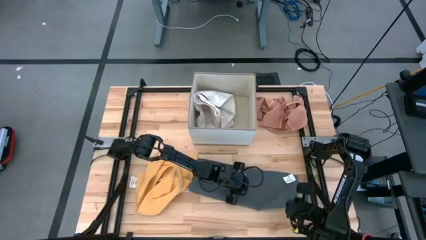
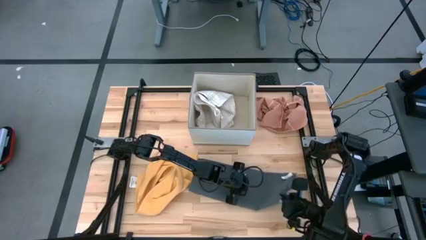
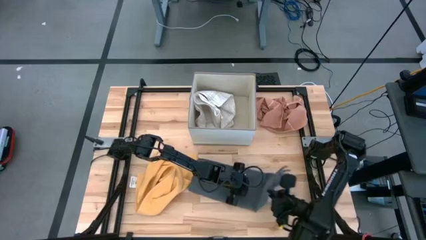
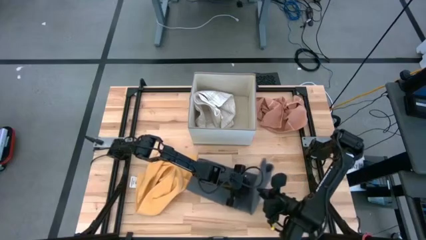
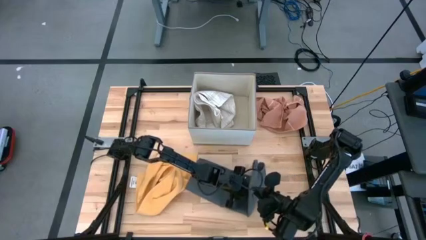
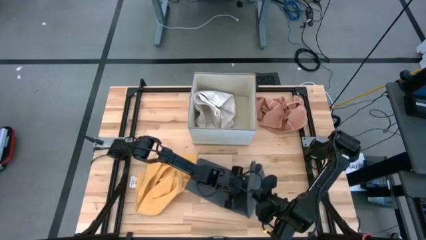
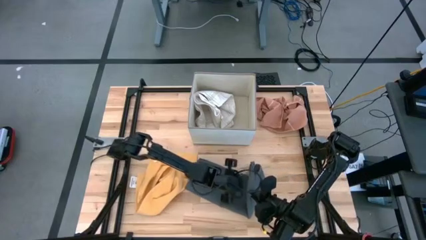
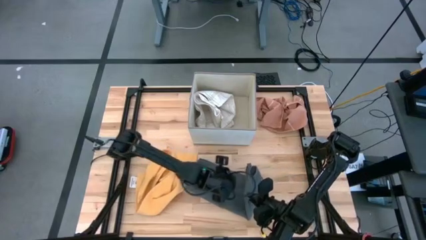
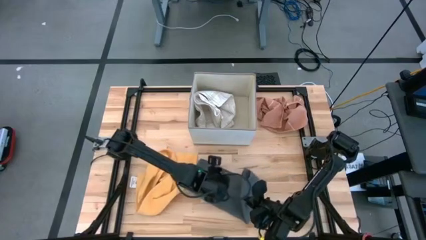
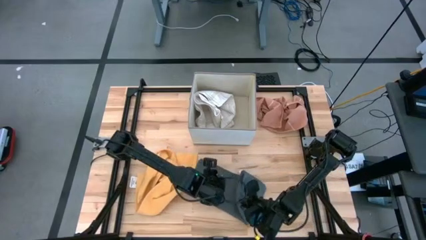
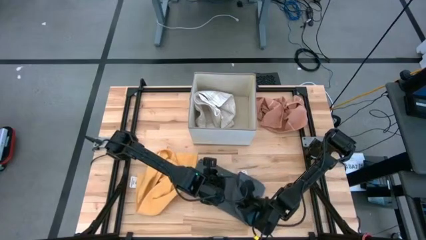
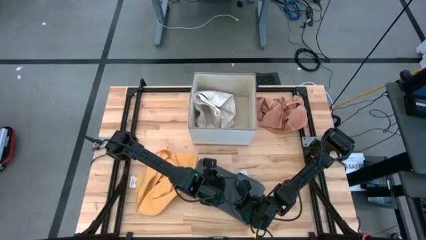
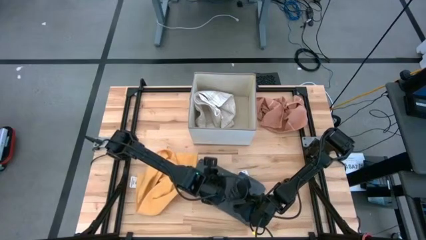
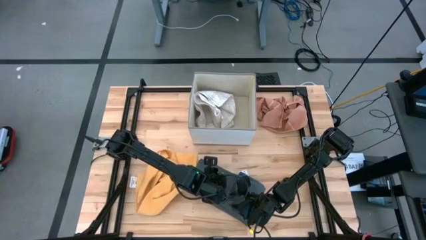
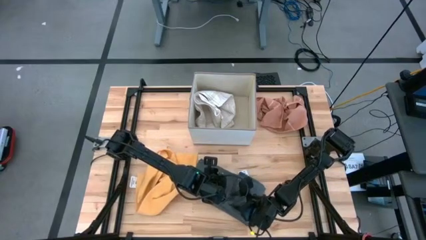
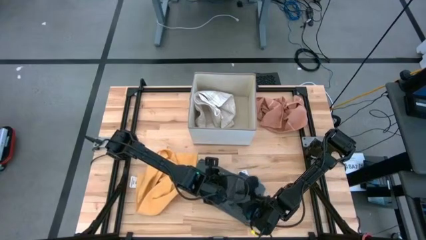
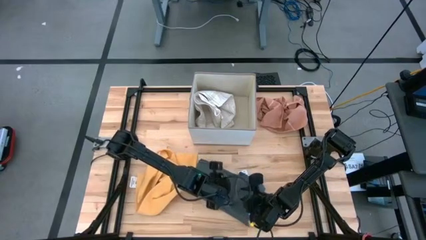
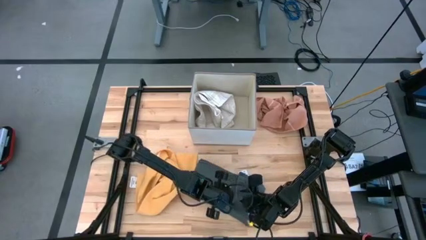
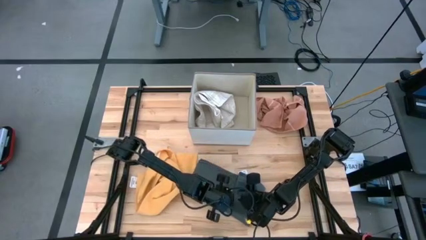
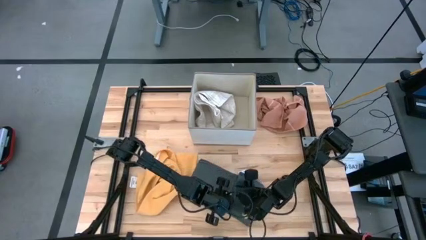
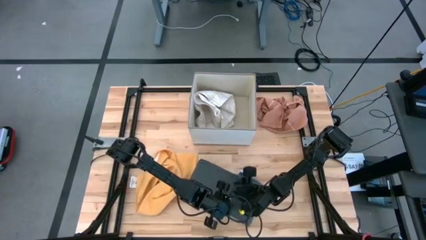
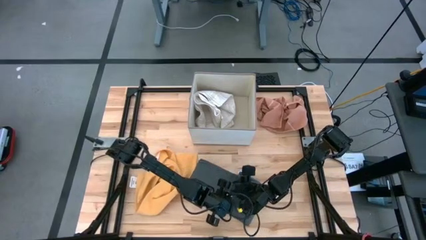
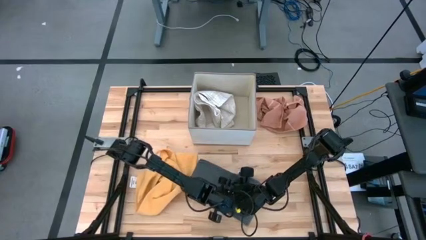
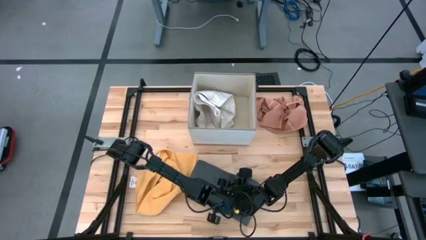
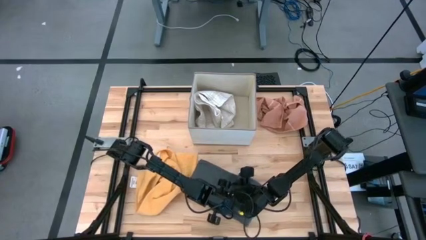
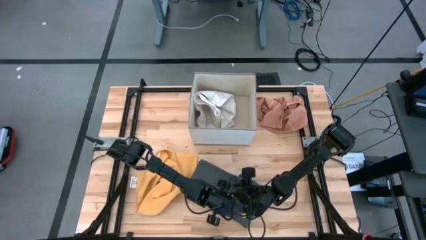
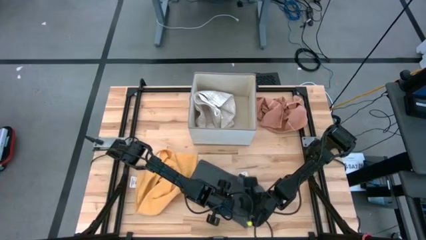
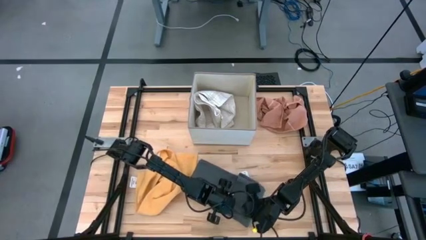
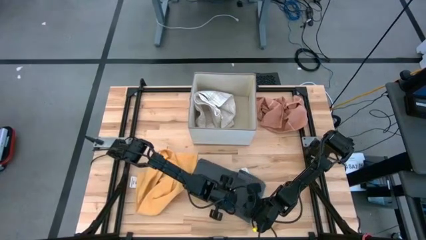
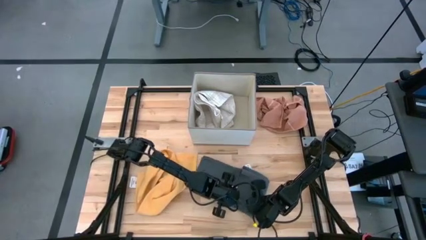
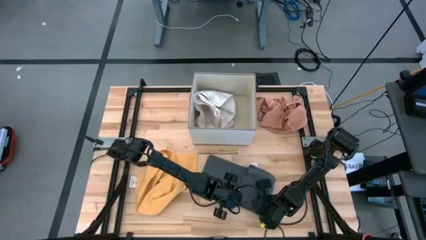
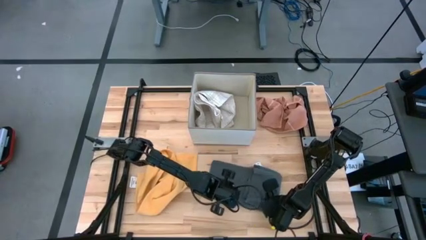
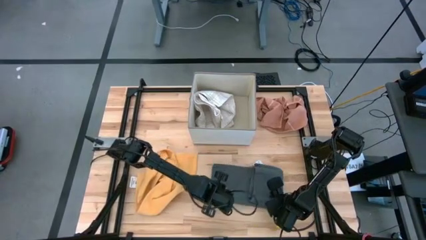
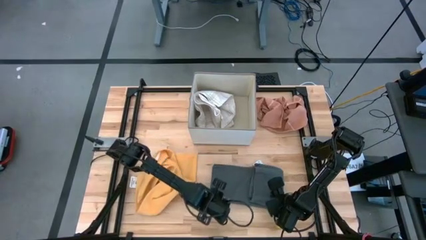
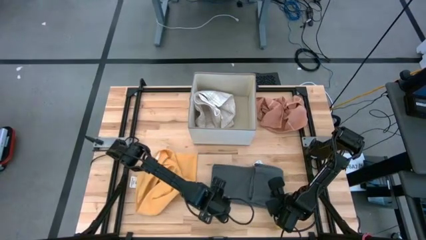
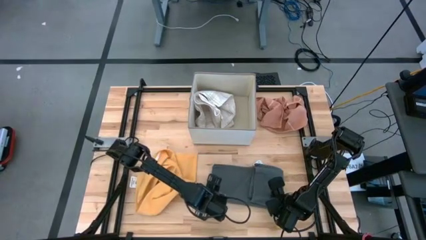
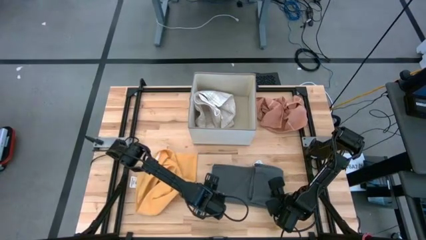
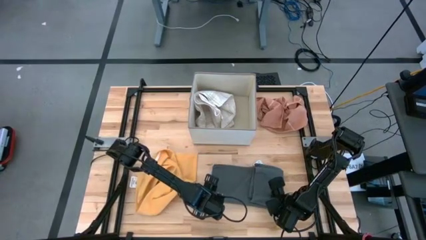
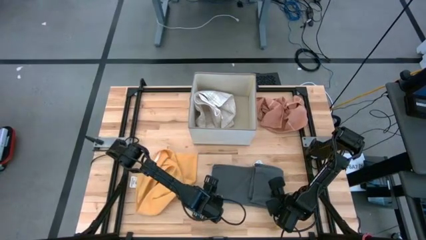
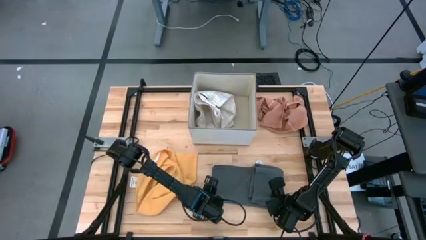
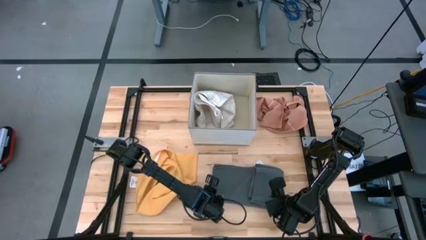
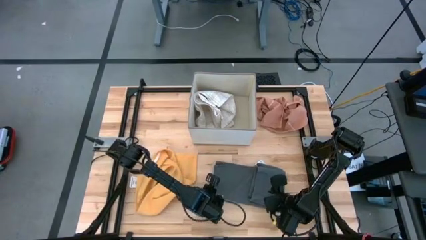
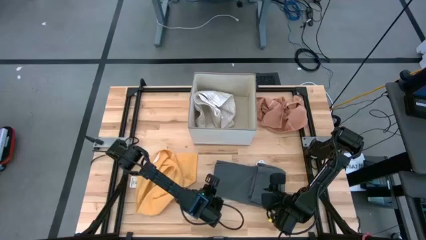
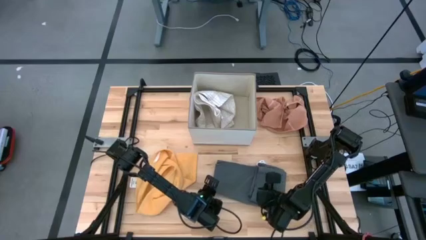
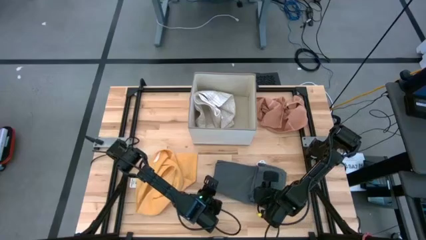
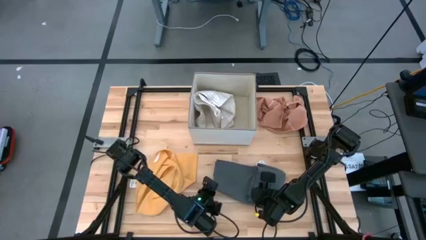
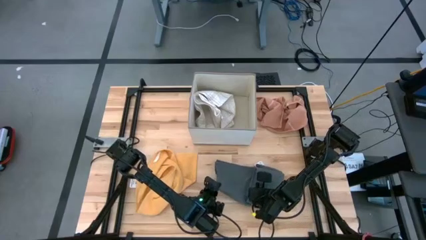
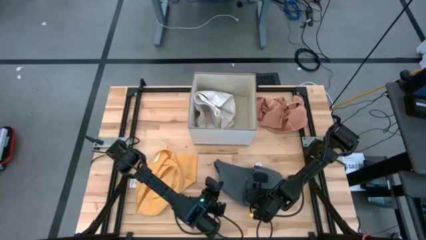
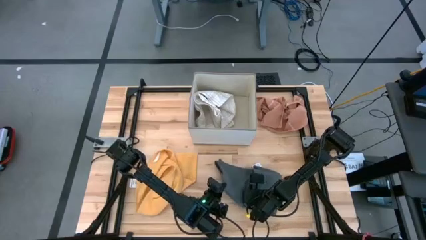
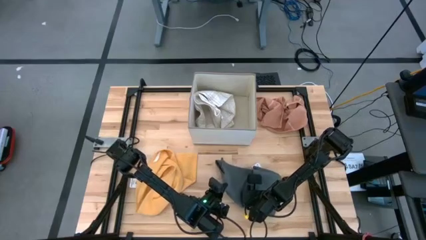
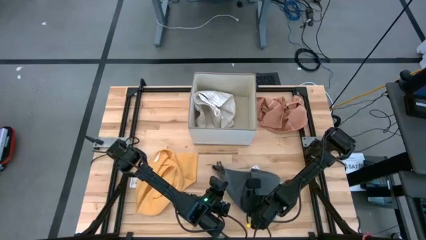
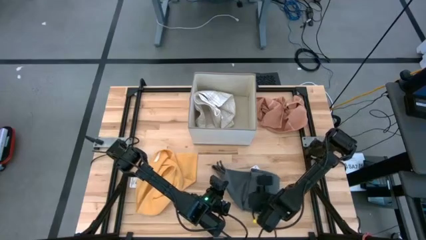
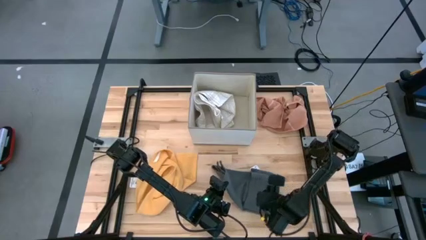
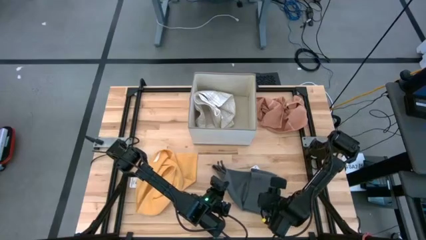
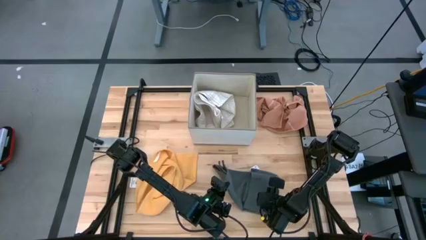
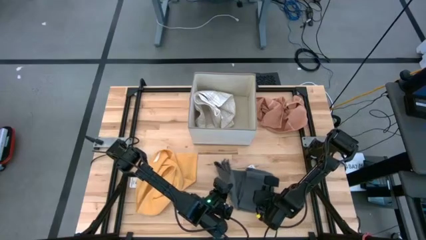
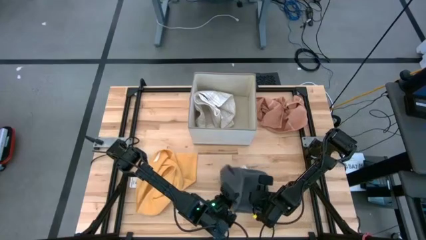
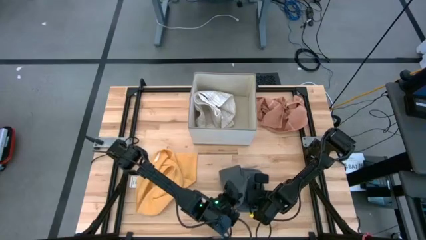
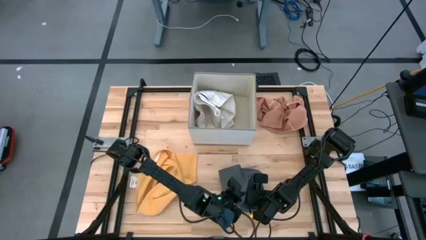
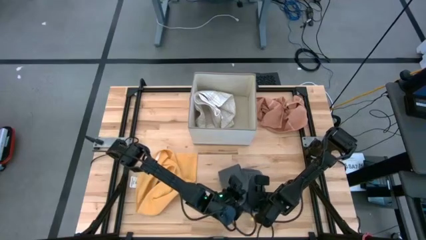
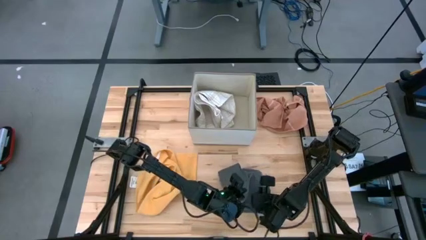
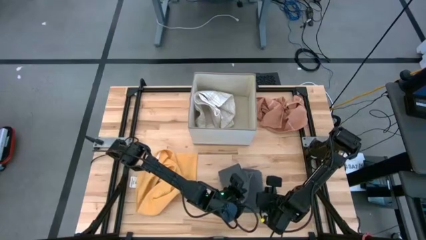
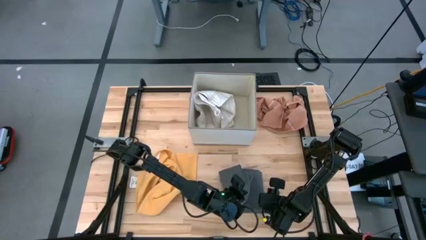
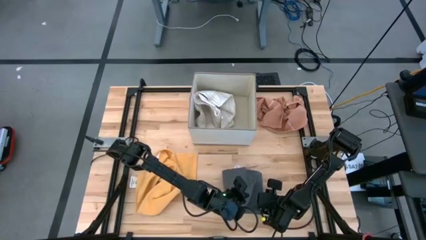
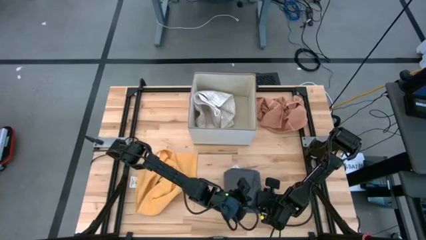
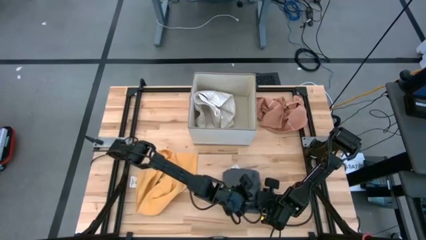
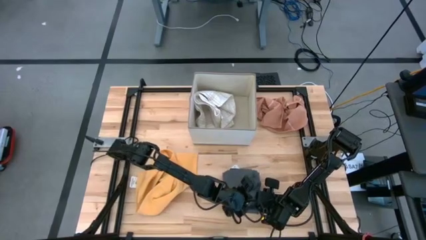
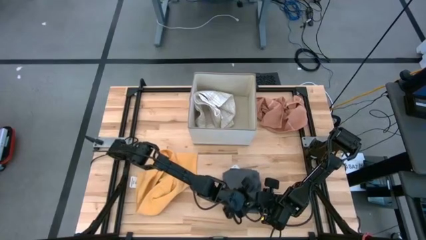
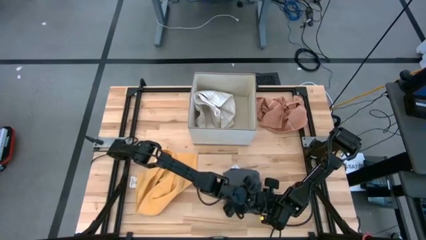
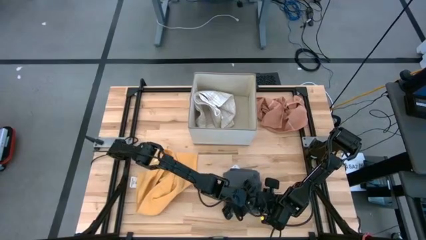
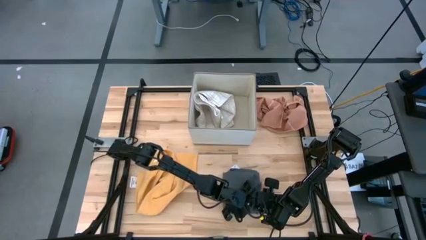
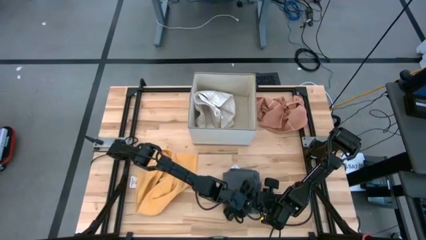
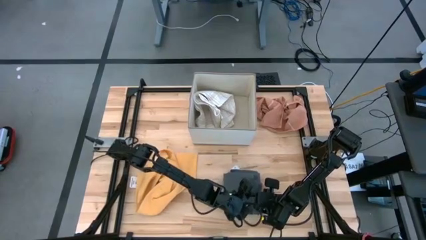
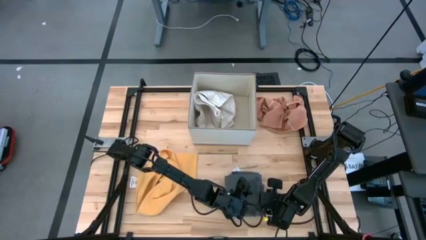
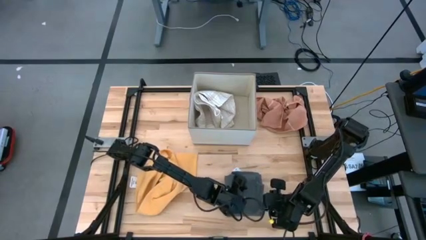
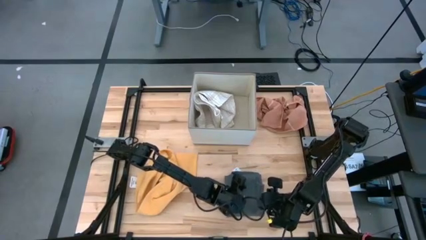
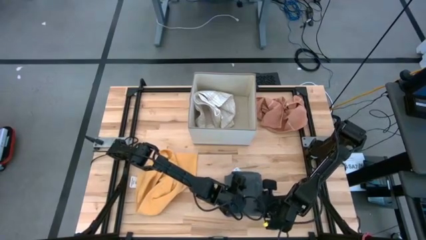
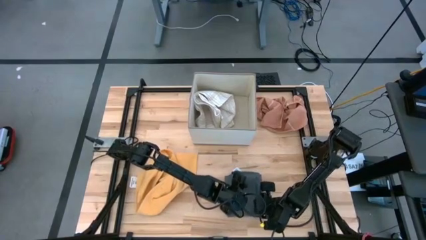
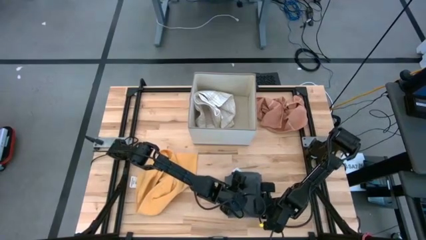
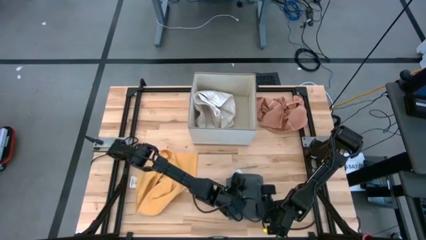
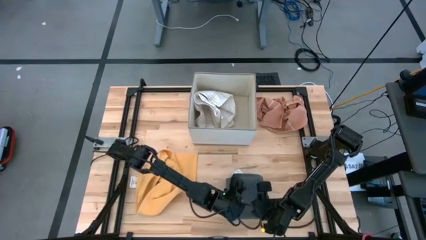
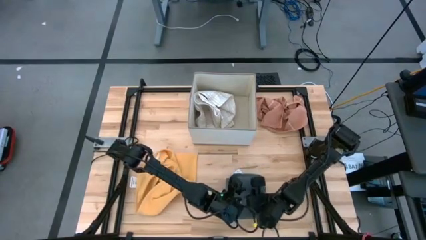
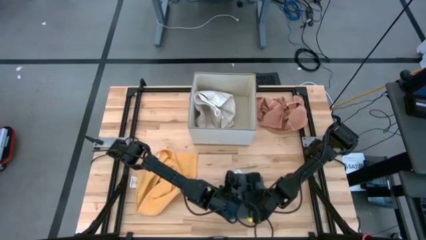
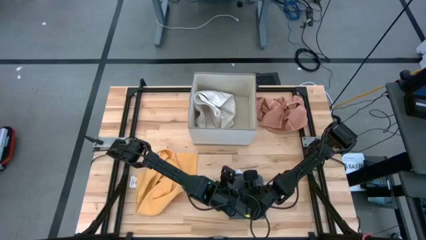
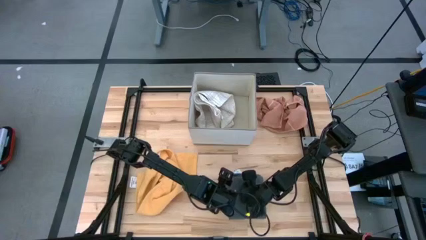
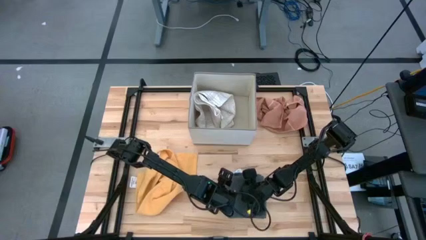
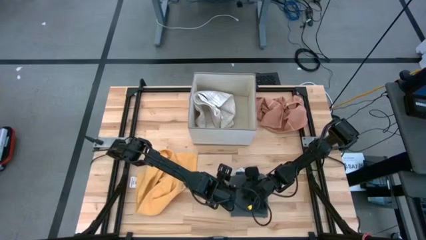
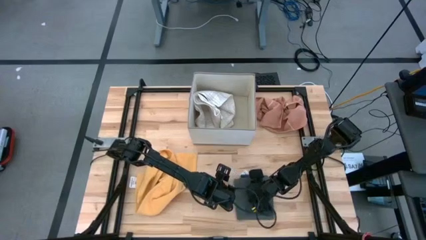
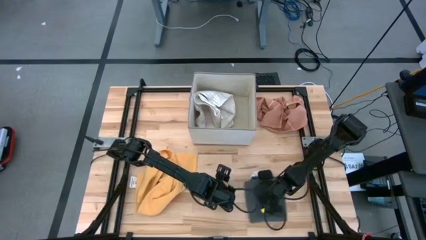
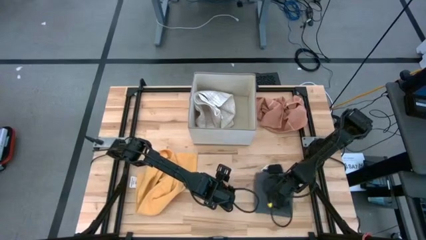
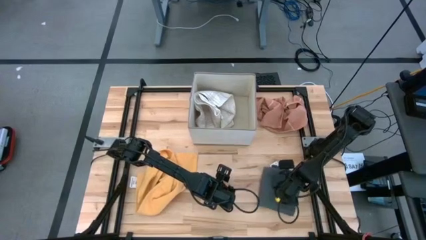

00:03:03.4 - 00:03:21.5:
Task: Fold towel
Fold the gray towel
